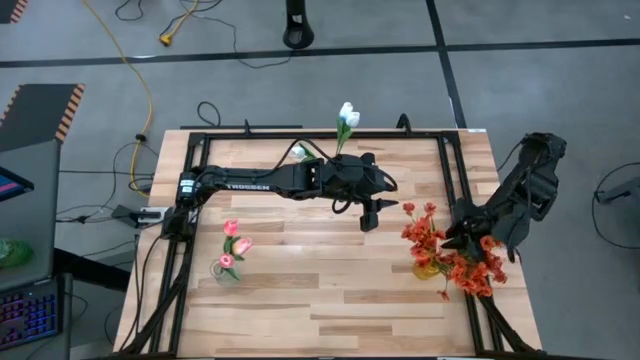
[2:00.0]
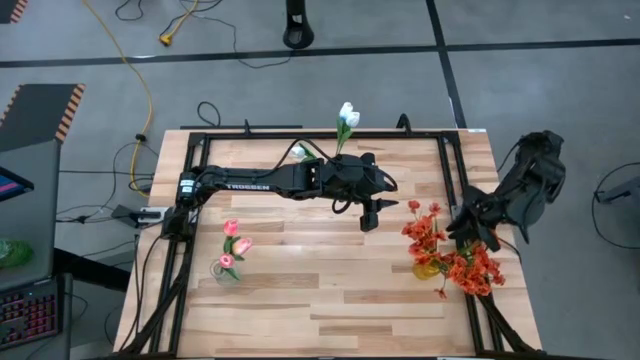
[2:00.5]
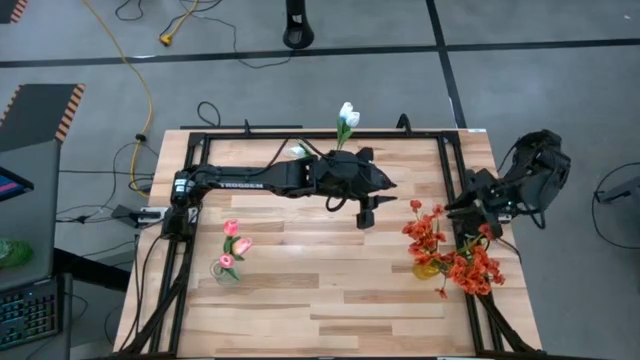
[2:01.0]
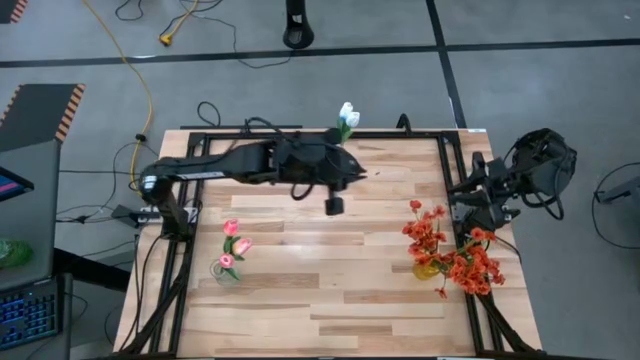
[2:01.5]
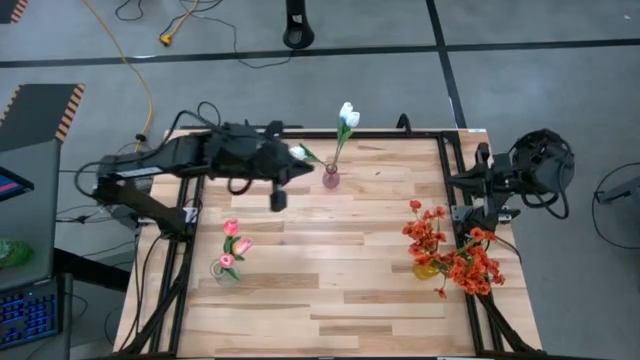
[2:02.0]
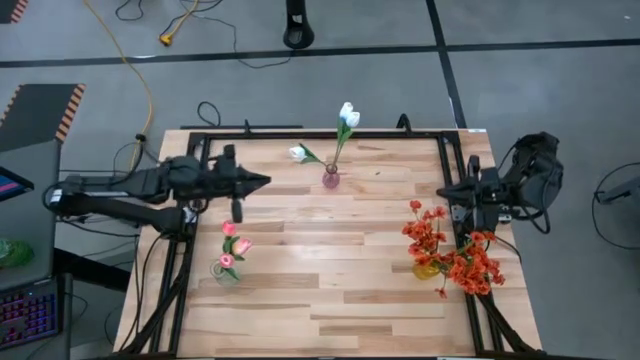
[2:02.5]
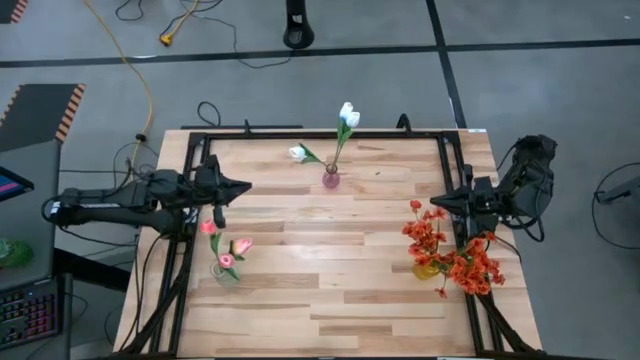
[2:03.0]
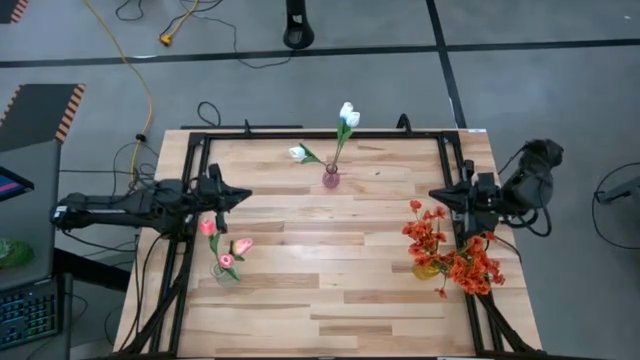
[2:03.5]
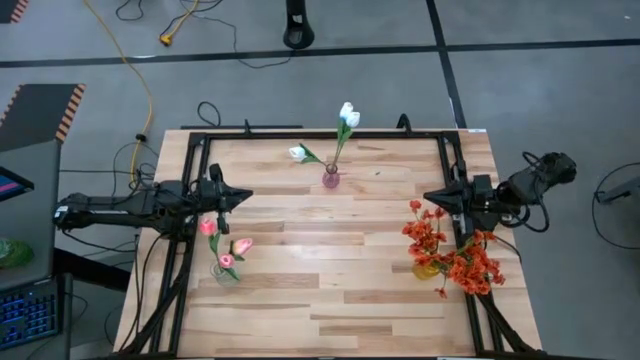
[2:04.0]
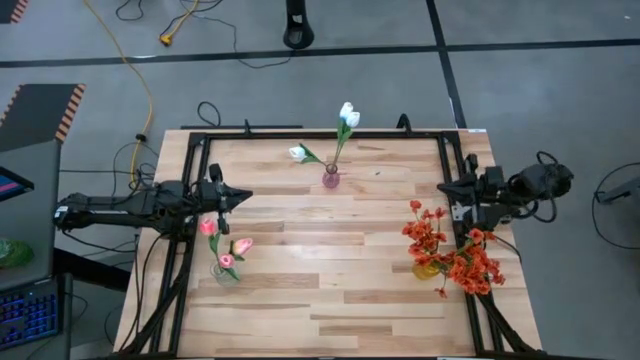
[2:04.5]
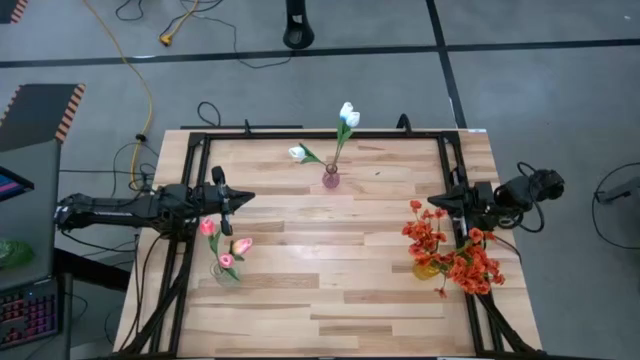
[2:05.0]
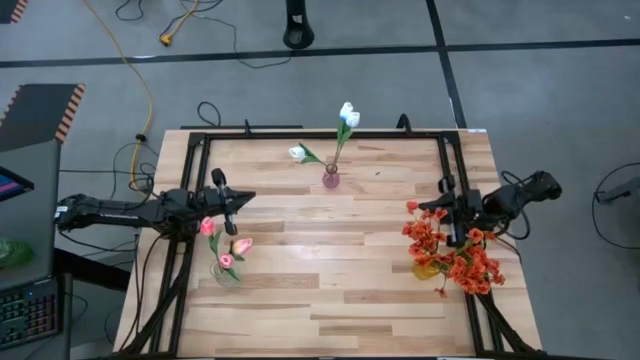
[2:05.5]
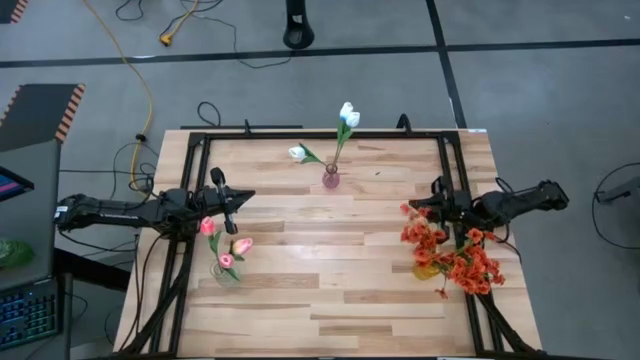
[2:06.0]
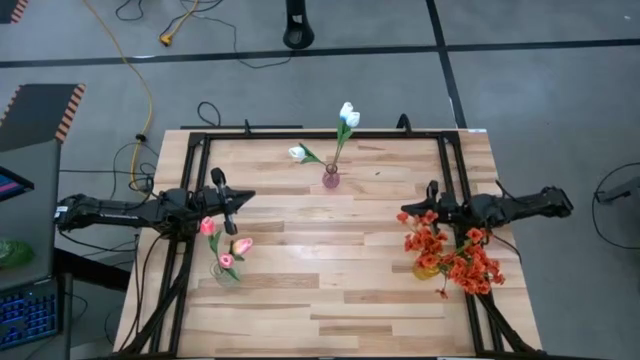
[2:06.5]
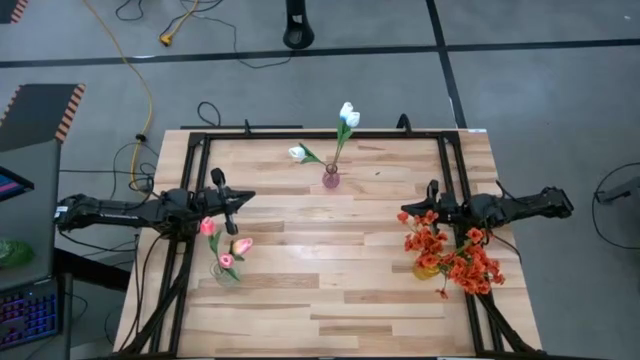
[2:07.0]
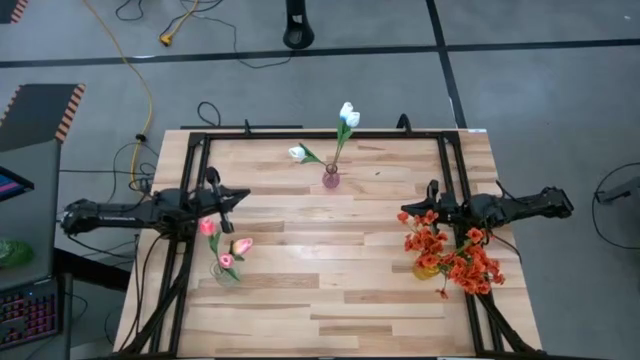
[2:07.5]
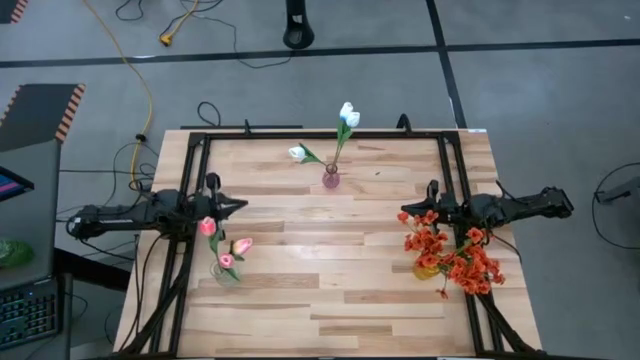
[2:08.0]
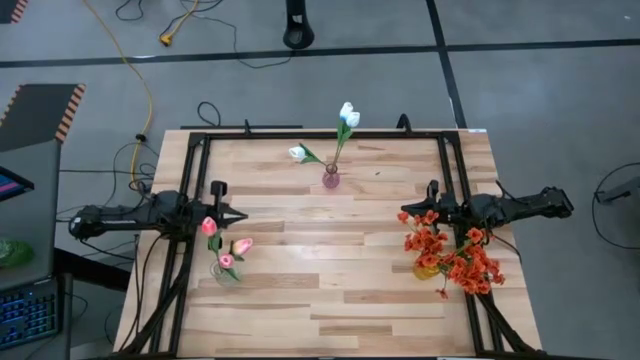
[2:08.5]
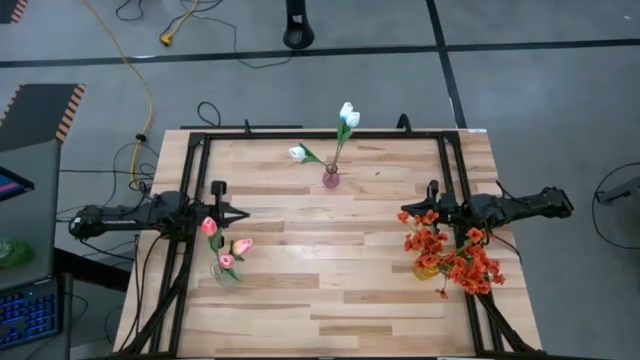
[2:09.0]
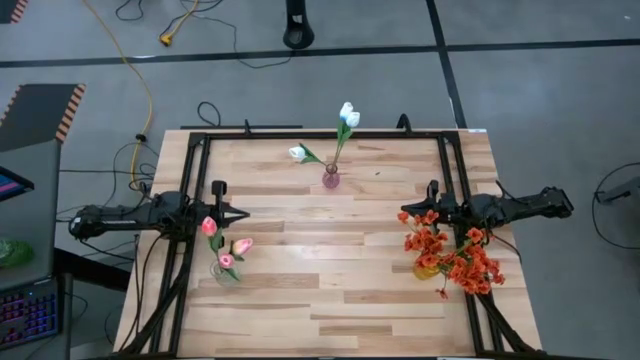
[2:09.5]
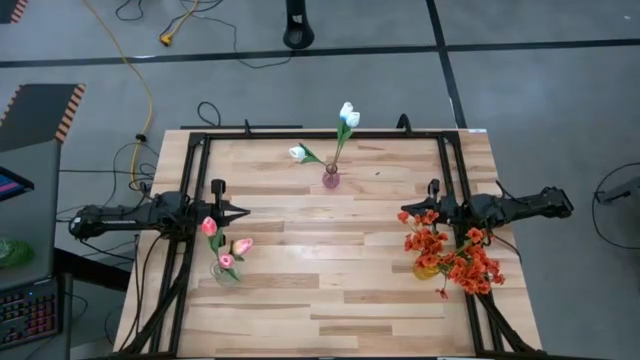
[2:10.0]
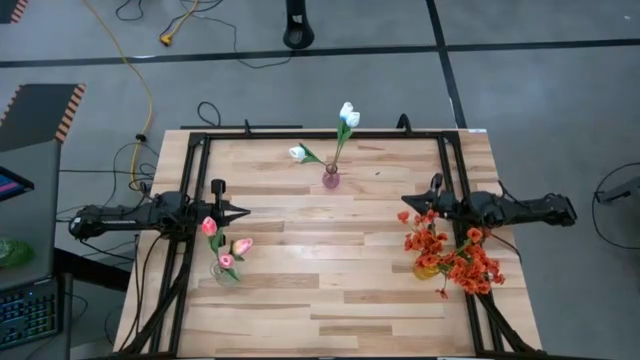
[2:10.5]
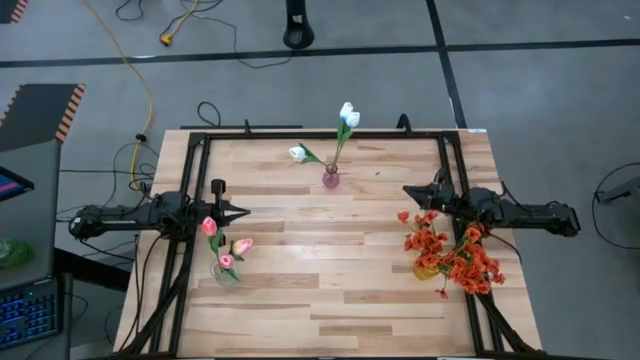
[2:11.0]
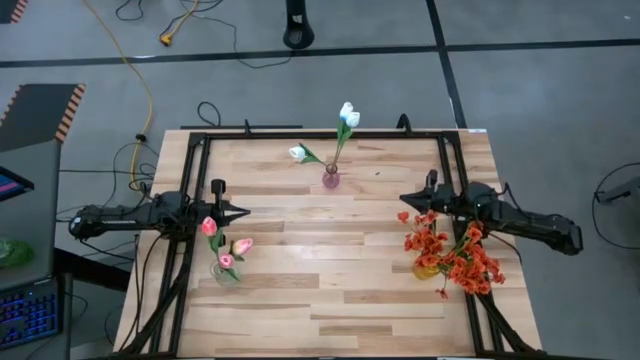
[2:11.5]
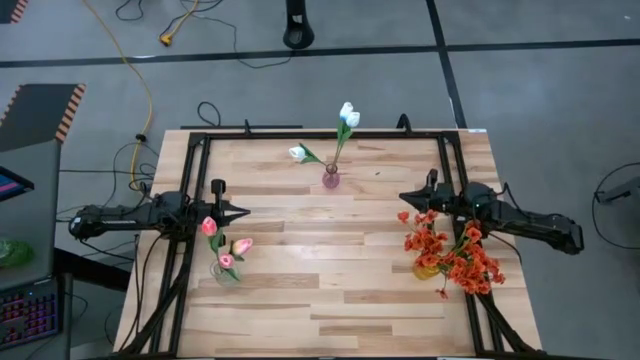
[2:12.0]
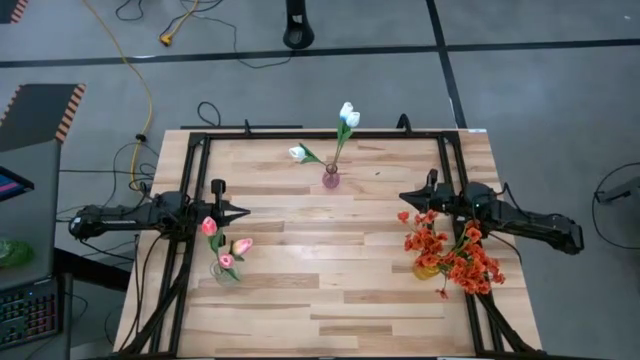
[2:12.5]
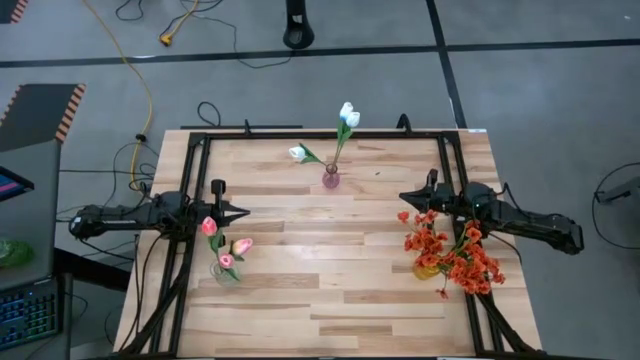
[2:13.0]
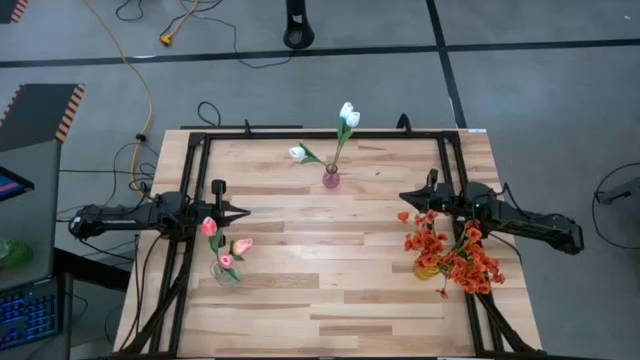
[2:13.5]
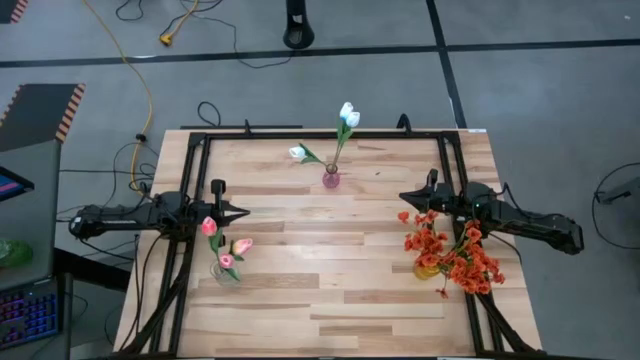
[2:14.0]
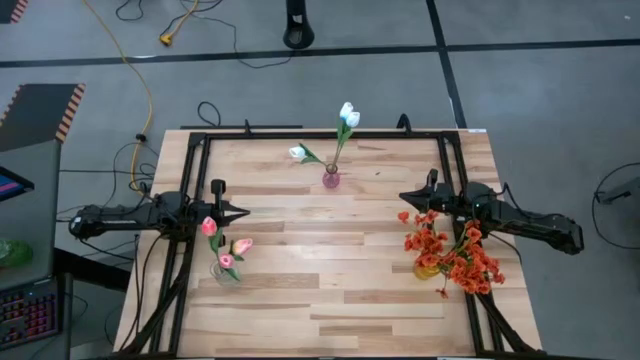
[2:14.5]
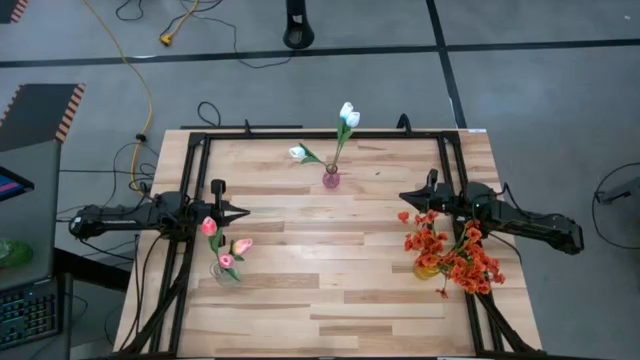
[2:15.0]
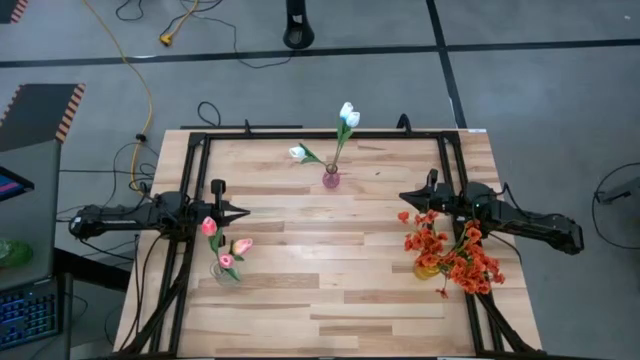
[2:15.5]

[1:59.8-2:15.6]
Task: Sort flowers into vase by color
Return to Home Position

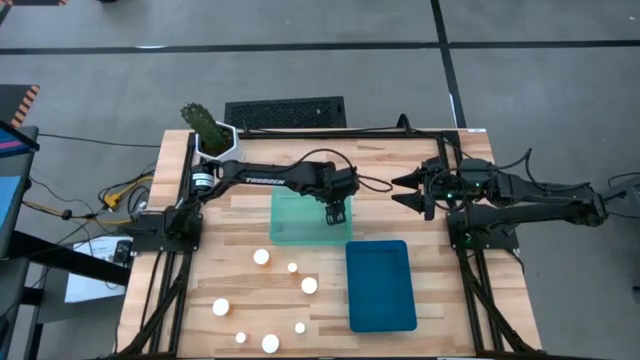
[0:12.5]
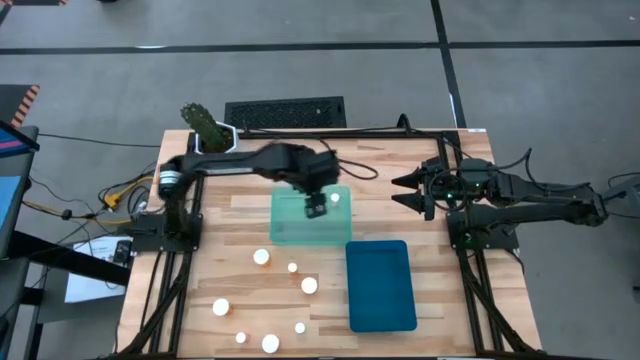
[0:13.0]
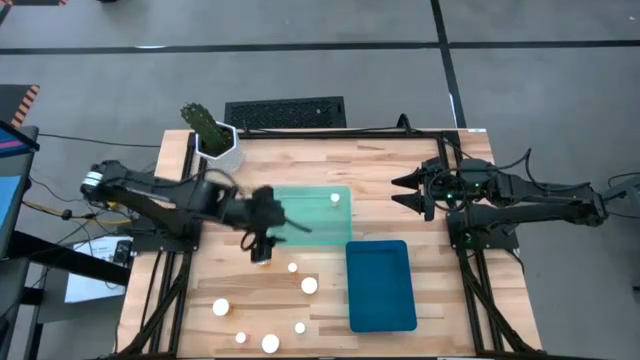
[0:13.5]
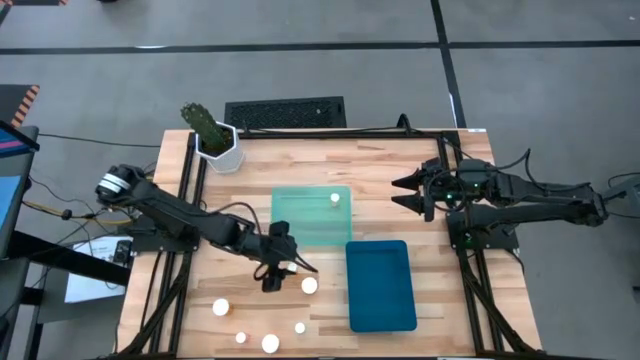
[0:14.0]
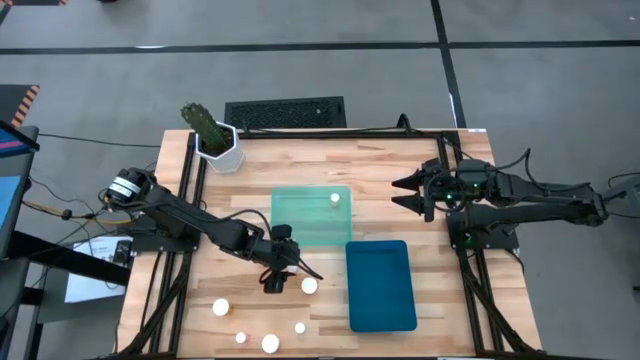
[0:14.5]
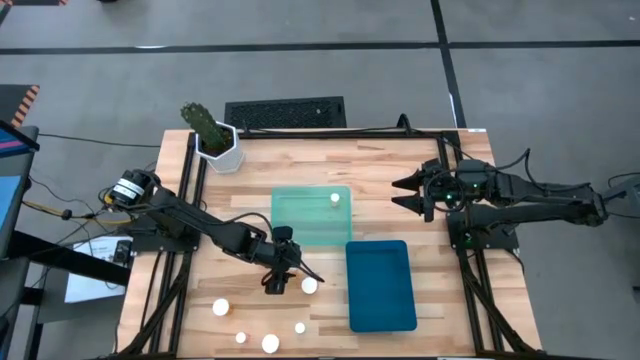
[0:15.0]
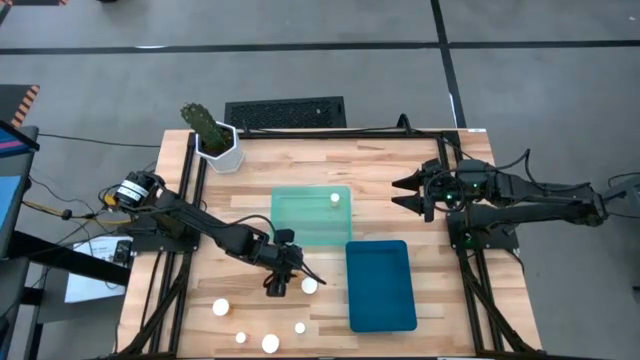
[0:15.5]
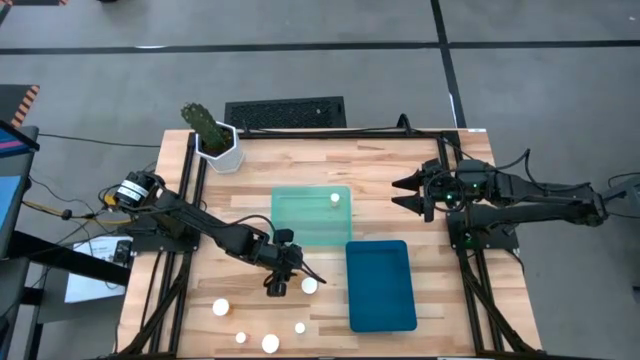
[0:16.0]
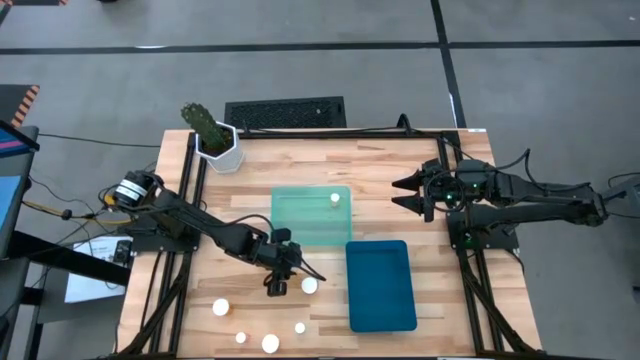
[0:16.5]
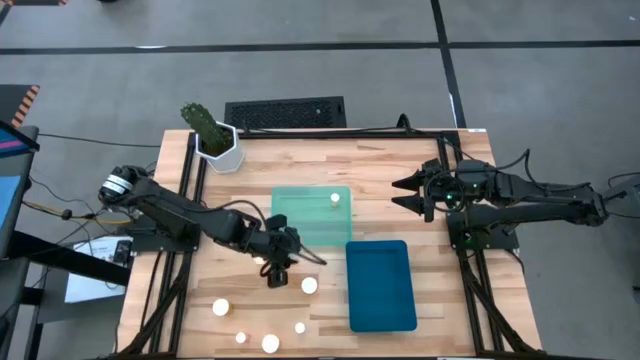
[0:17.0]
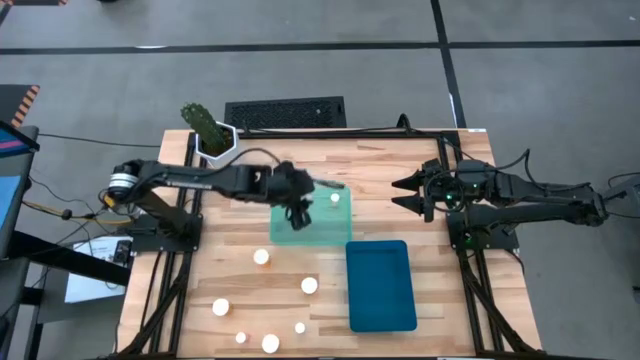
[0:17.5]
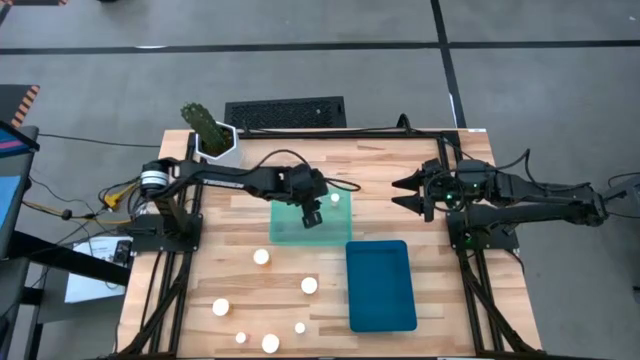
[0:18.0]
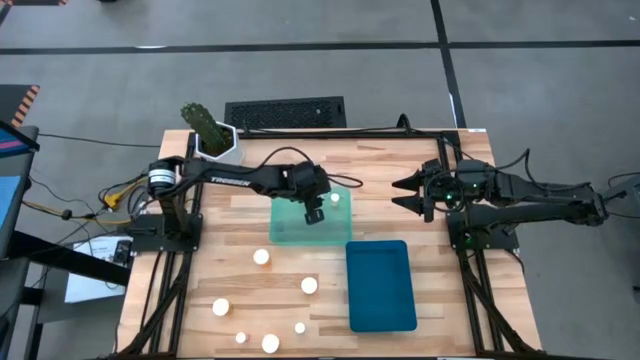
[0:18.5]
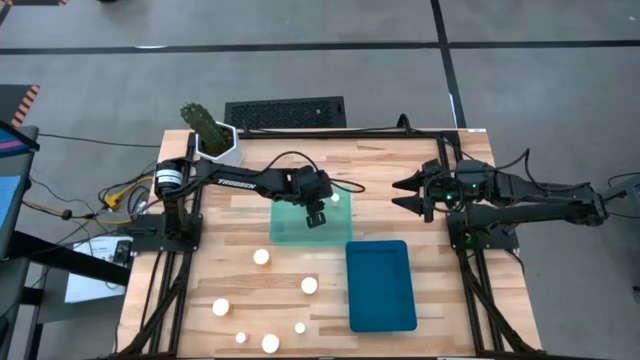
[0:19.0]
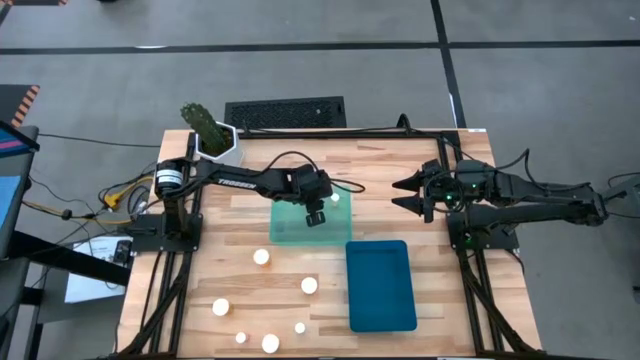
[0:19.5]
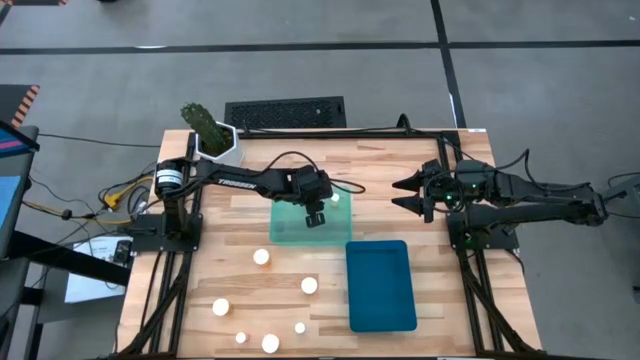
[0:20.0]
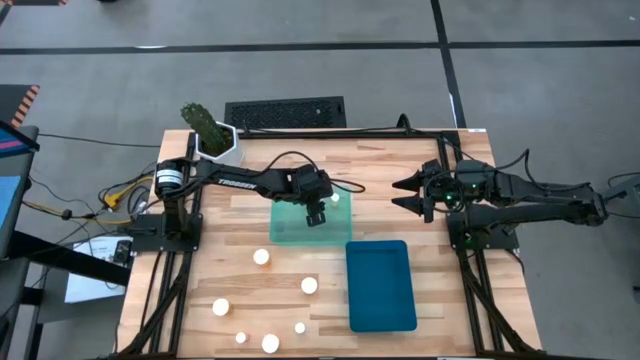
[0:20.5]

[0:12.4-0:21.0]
Task: Pick and place medicine bottles into bin by pill shape (circle, oval)
Put the small orange pill bottle into the light blue bin
